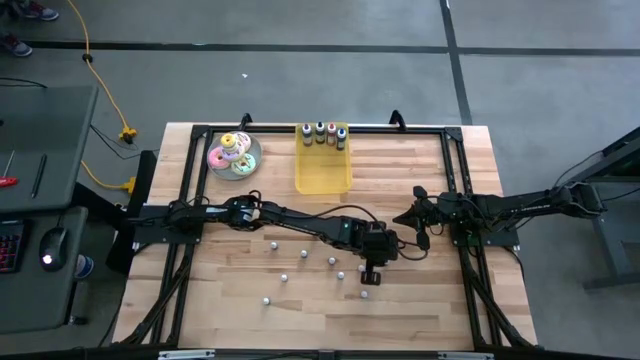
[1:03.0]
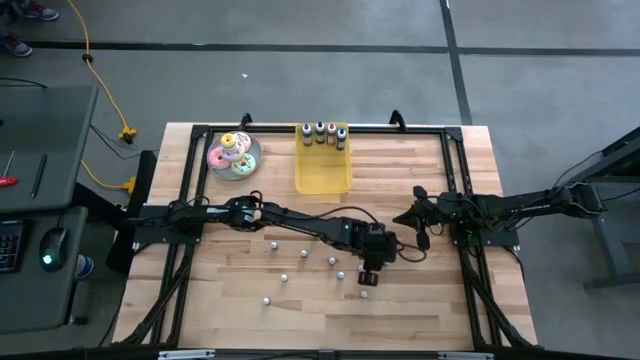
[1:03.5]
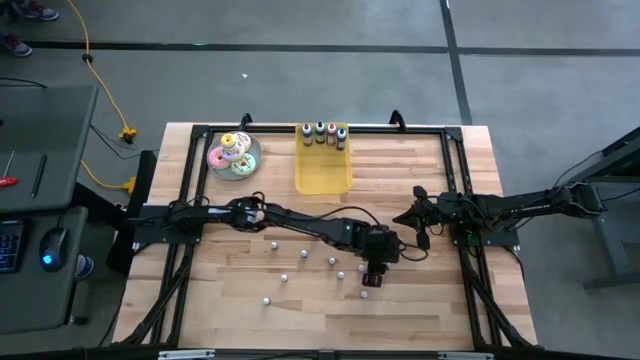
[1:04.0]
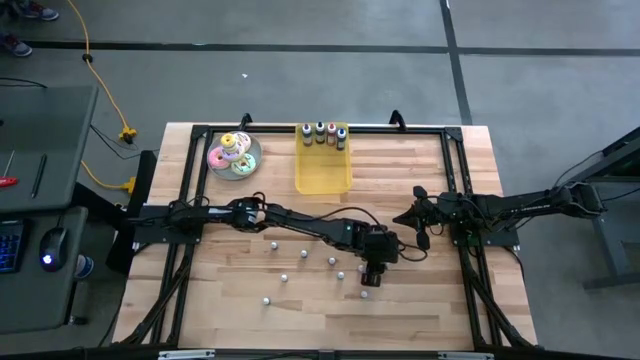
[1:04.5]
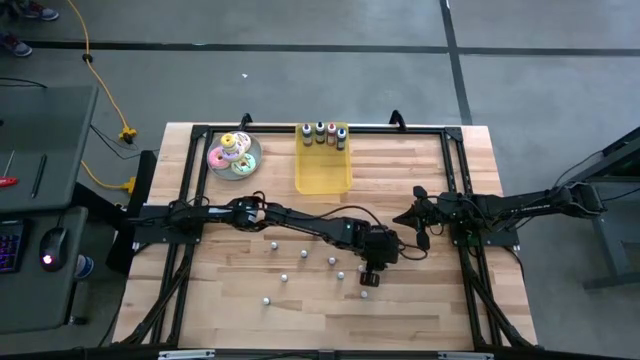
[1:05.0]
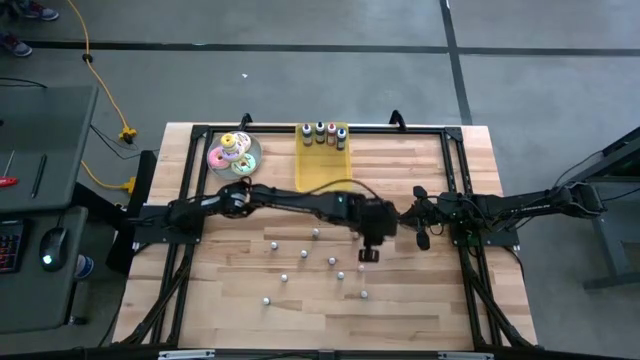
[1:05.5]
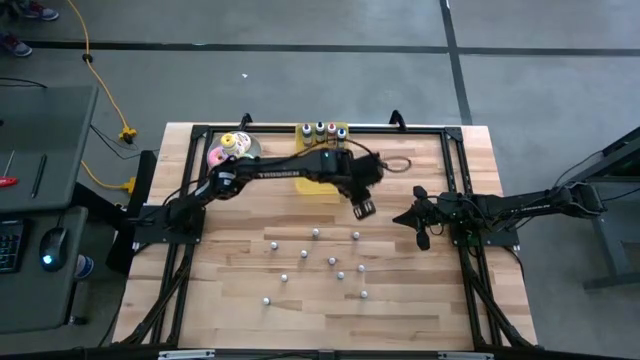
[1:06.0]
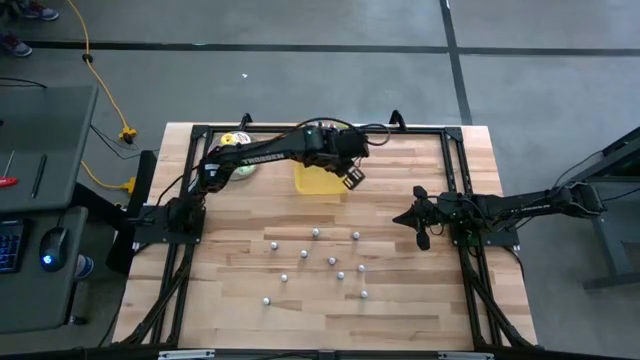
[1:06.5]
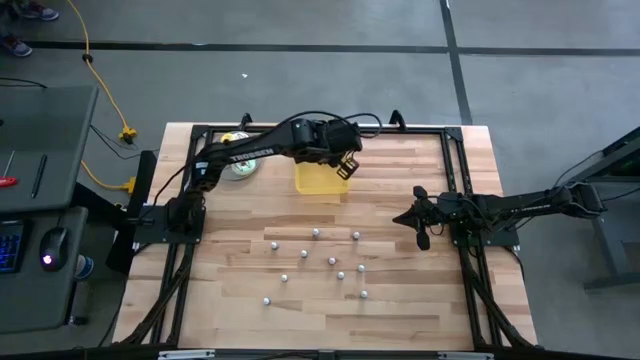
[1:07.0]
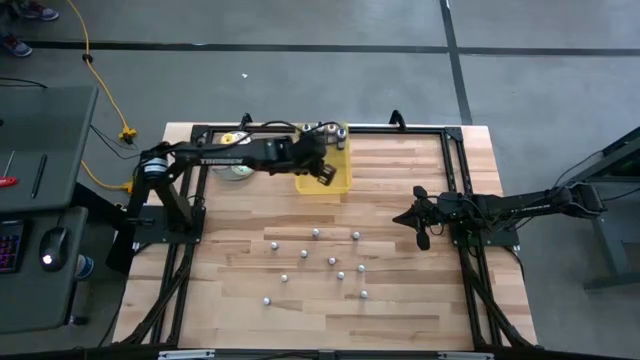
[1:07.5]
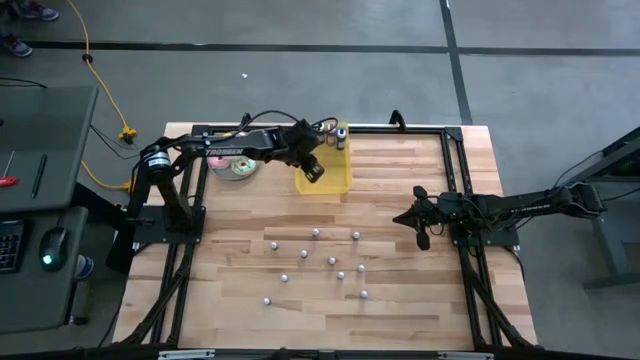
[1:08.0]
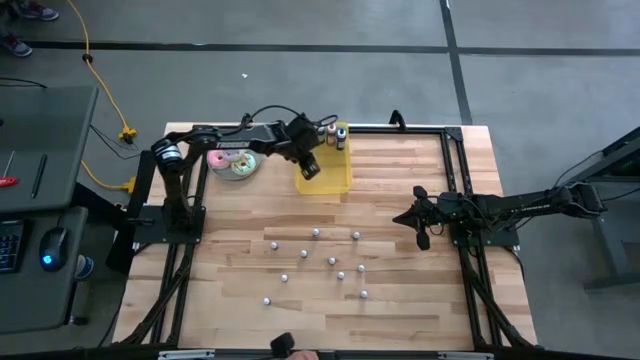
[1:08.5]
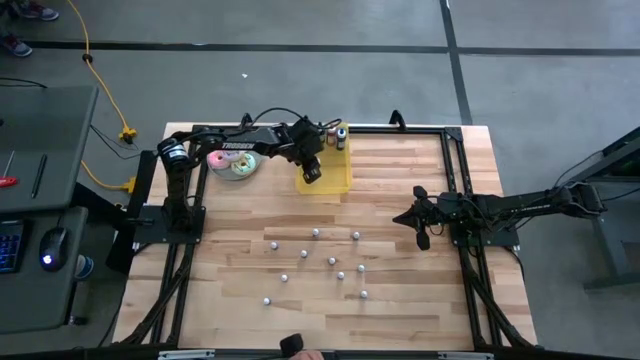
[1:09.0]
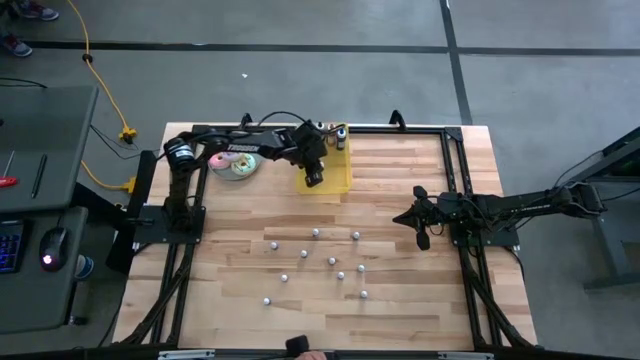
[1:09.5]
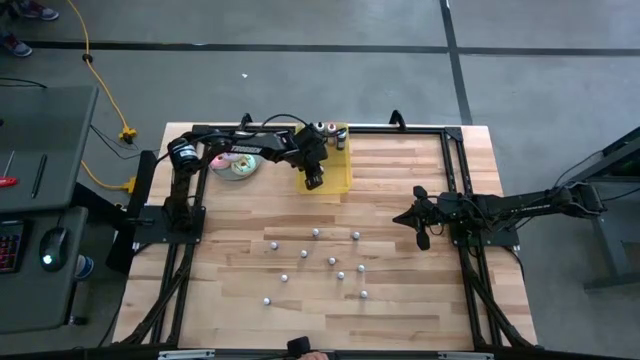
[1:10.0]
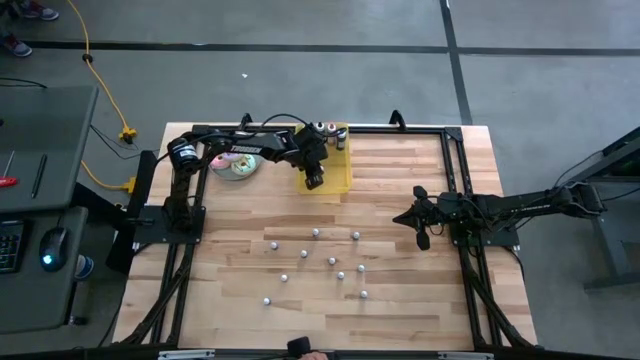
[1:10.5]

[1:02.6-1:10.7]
Task: Pick & Place food coloring
Put the right small black food coloring bottle into the yellow bin

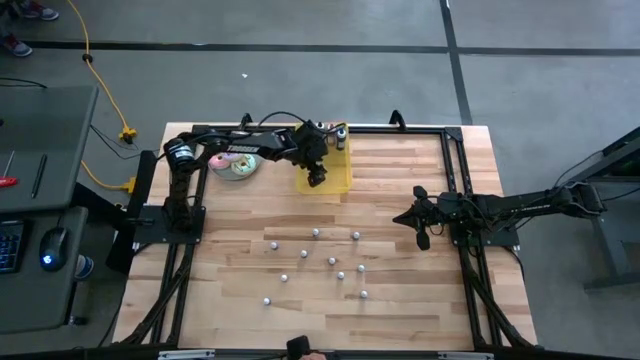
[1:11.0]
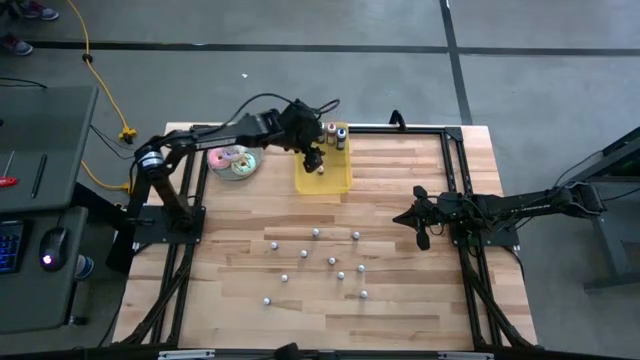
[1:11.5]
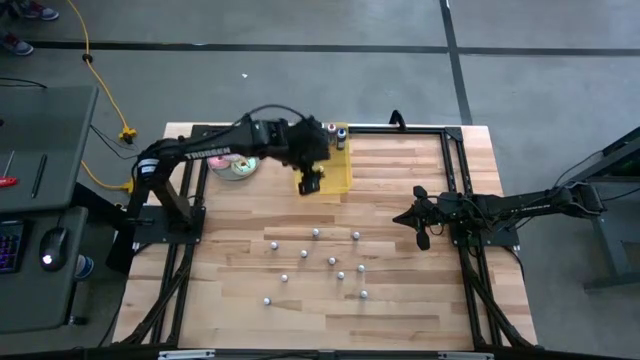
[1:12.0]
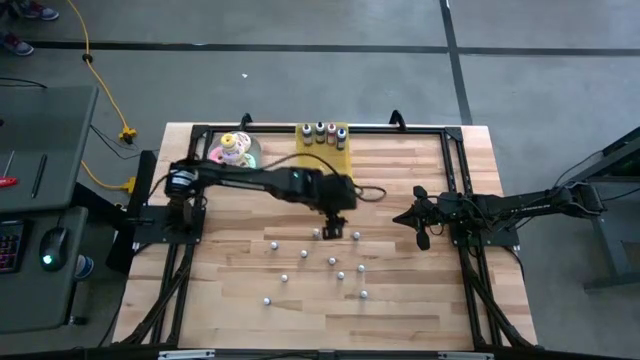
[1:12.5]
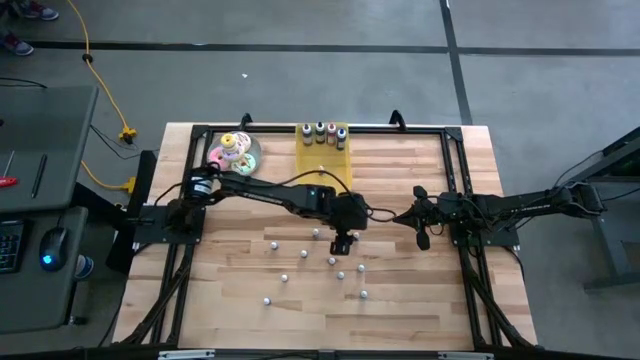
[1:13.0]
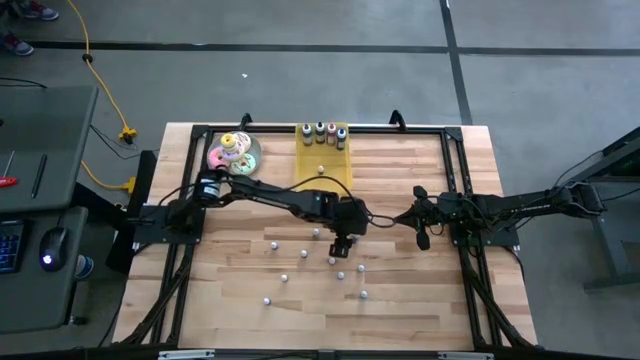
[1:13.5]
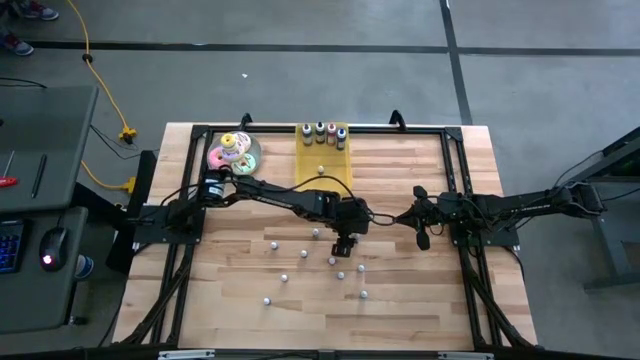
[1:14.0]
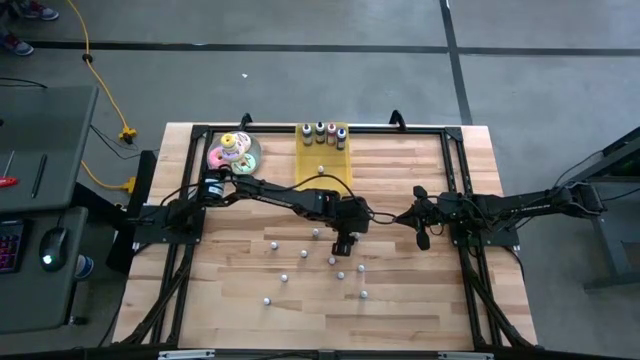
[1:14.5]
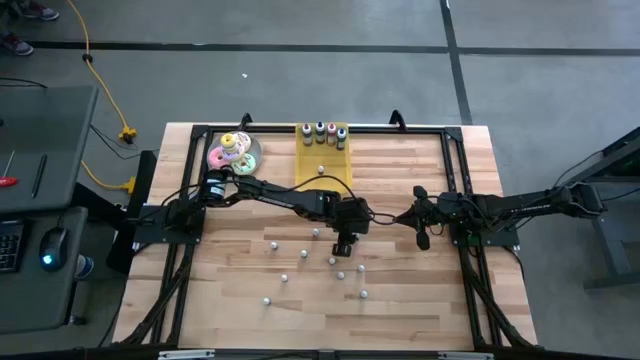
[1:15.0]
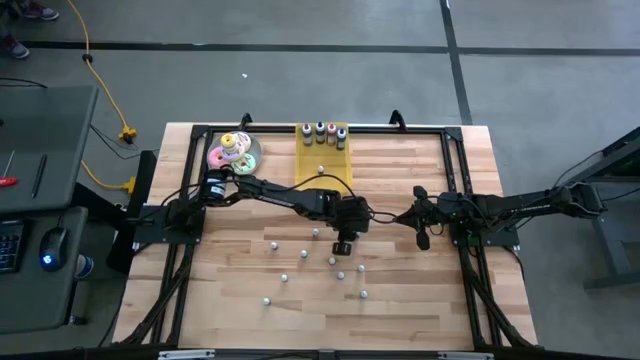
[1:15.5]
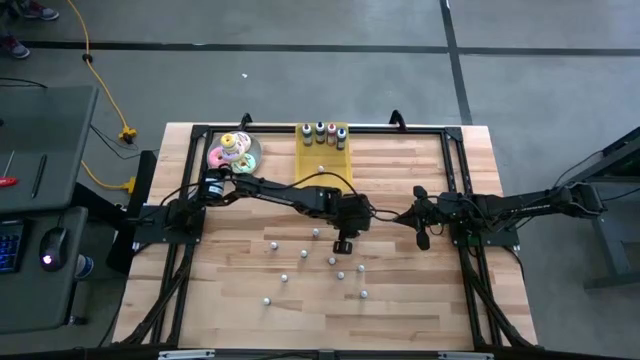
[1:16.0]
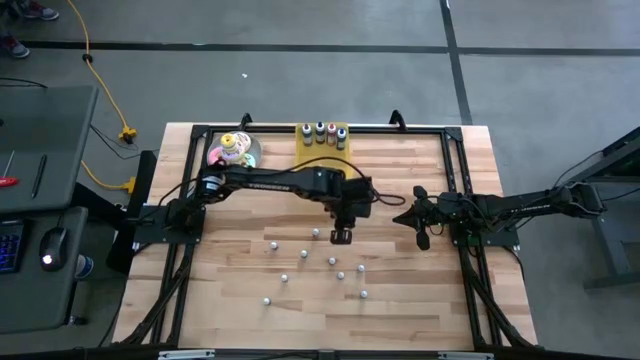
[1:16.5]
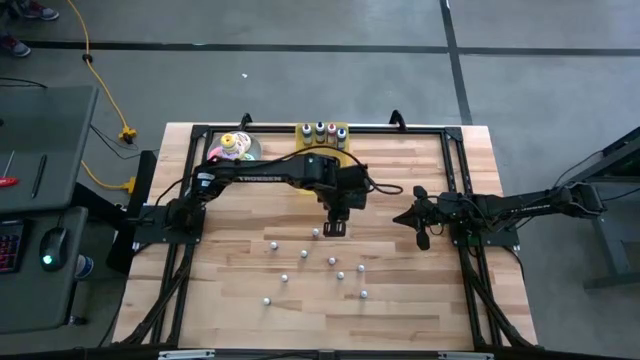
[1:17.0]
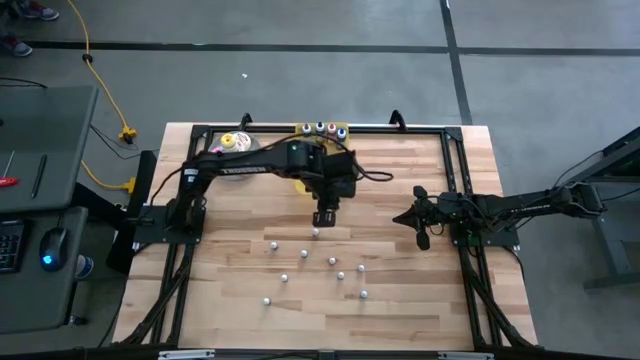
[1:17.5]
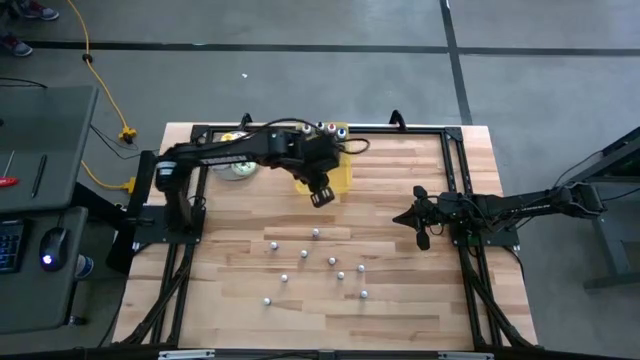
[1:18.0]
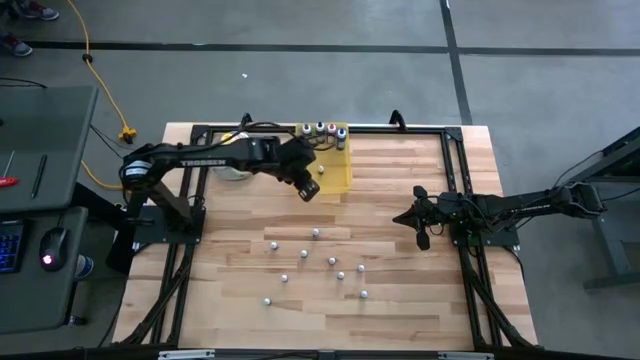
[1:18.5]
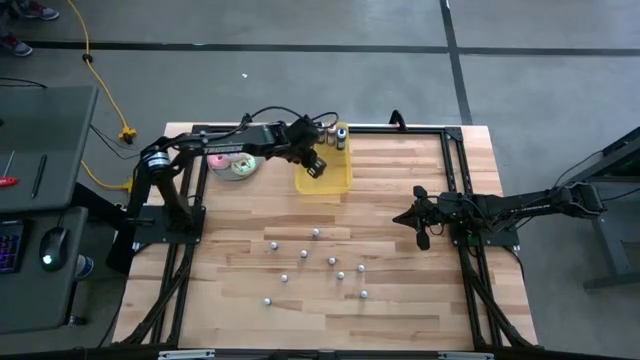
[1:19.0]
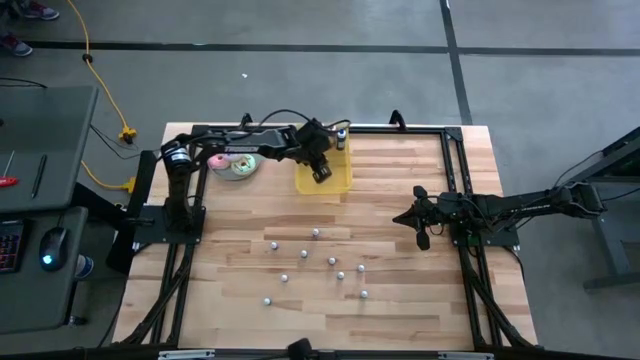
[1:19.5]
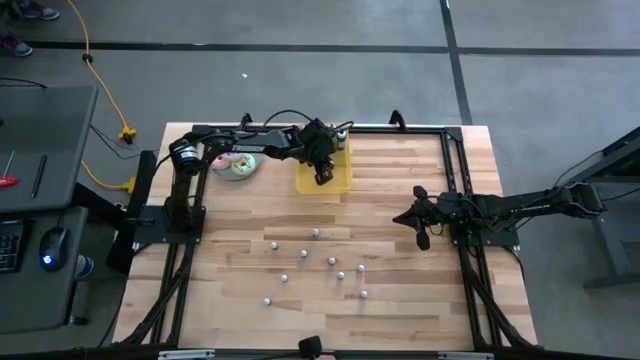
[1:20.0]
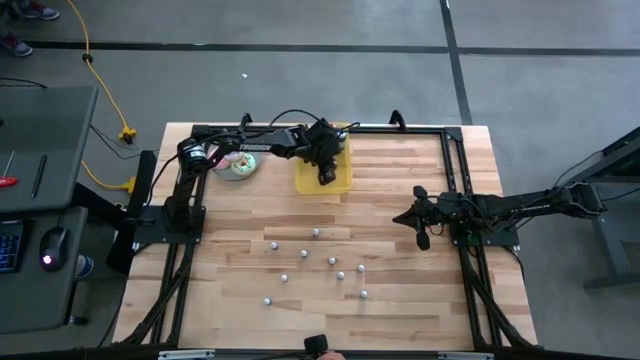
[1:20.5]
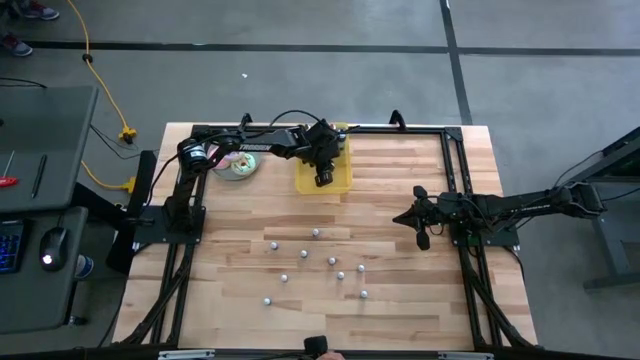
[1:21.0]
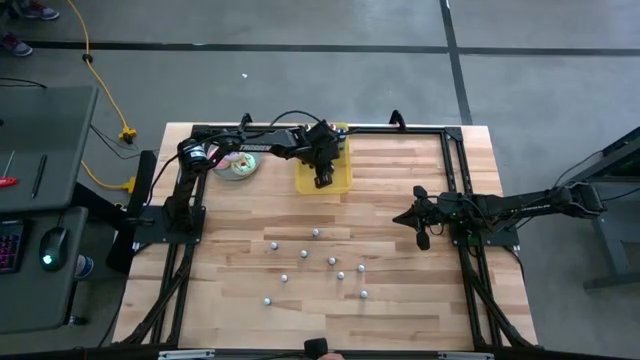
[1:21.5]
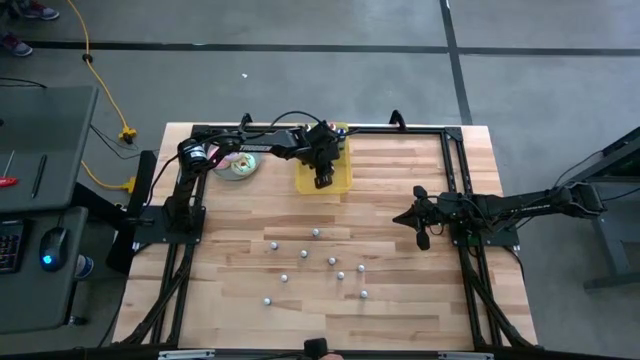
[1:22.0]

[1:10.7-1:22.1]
Put the small blue food coloring bottle into the yellow bin

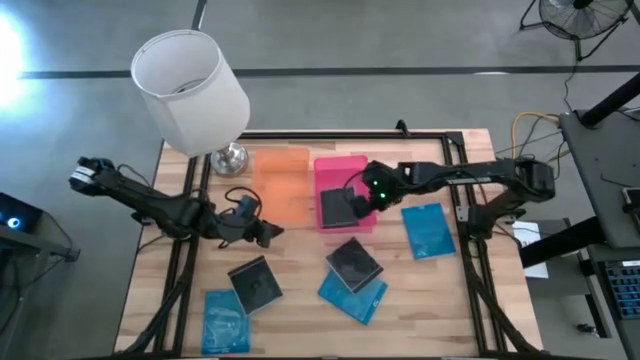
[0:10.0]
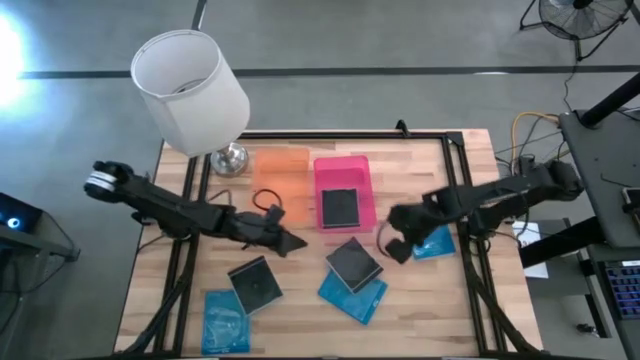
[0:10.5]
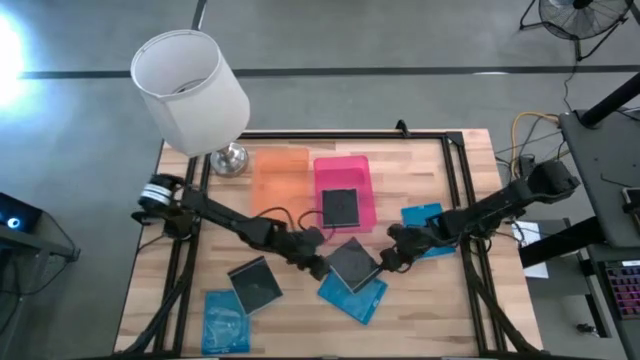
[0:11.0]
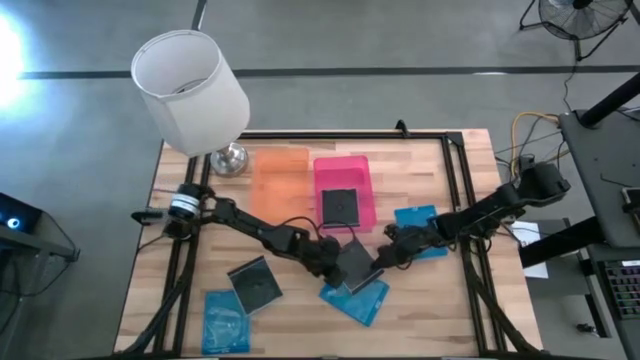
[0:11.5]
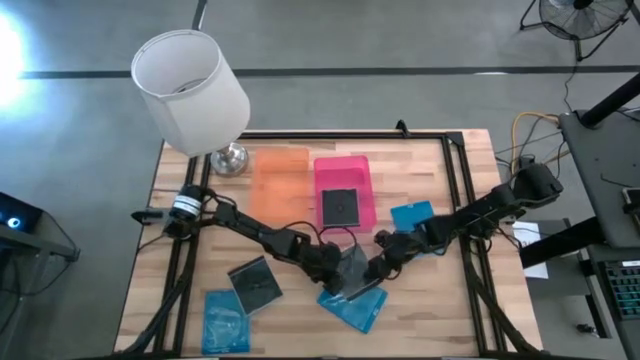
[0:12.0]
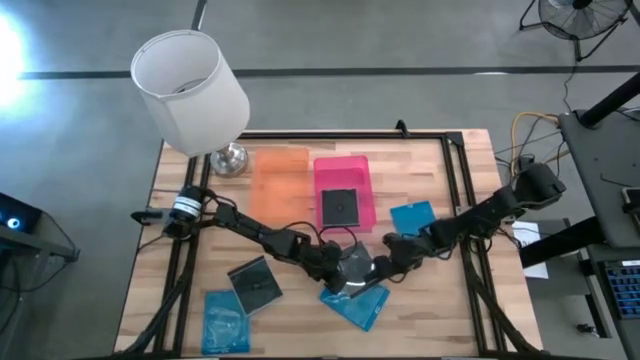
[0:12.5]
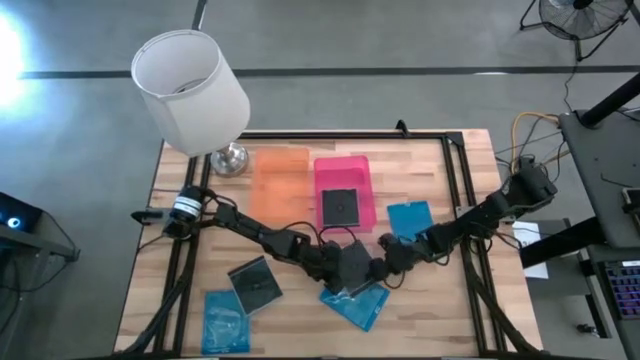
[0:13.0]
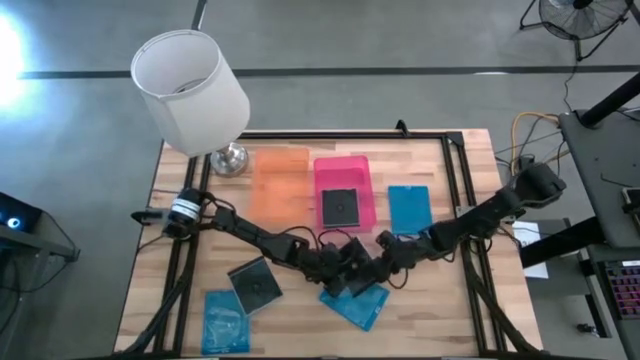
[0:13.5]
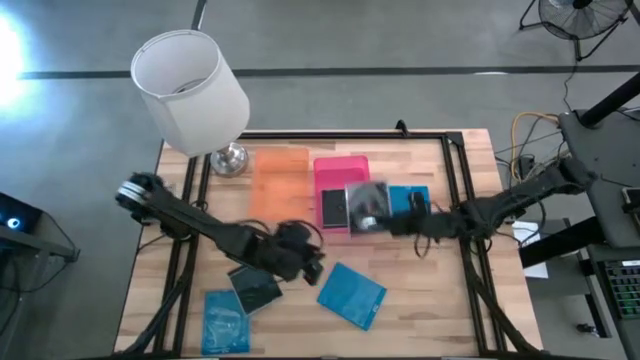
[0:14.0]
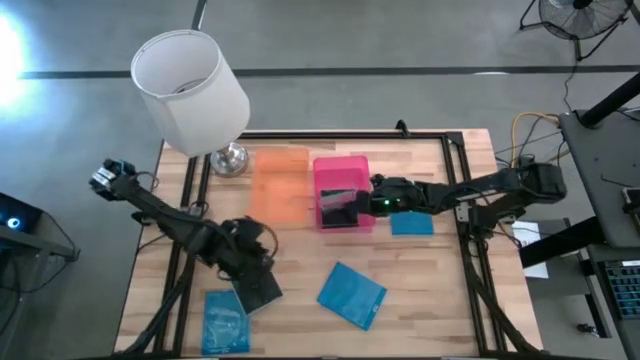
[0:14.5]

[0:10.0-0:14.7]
Task: Pick & place jewel cases by type
Put the right black CD case into the pink bin
